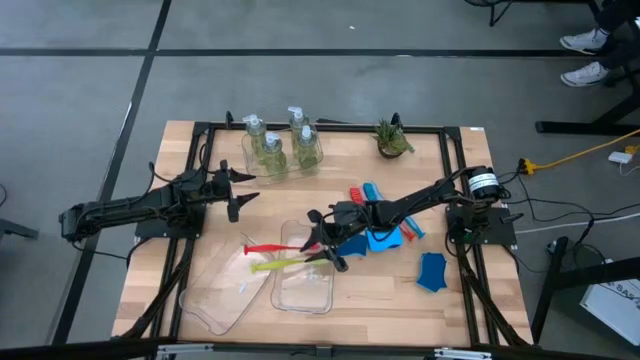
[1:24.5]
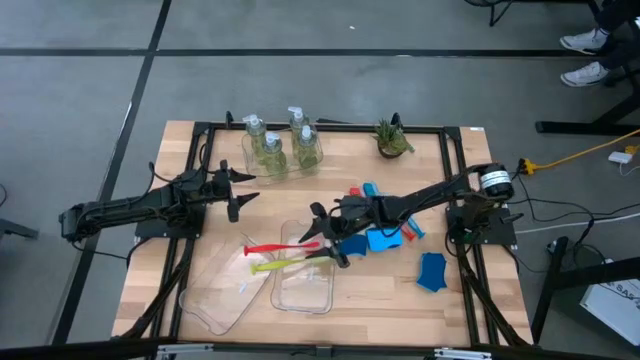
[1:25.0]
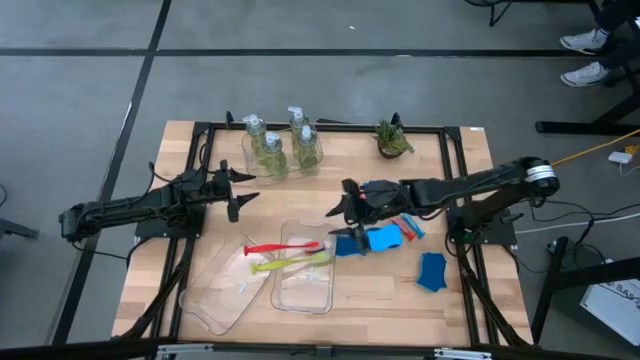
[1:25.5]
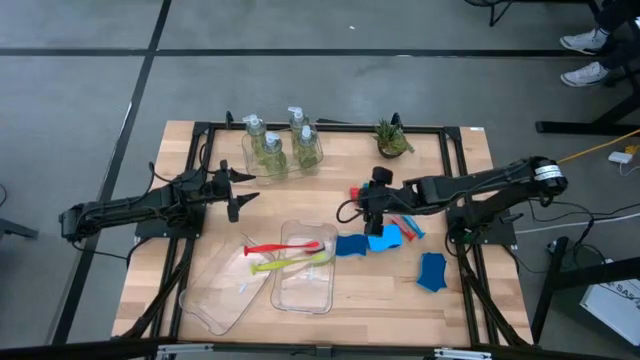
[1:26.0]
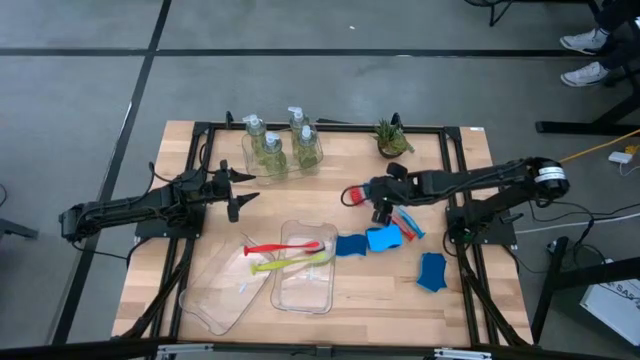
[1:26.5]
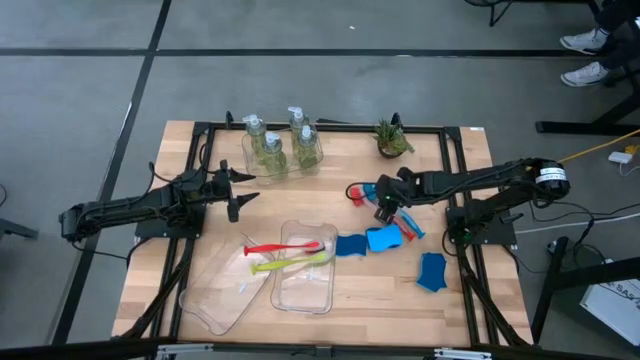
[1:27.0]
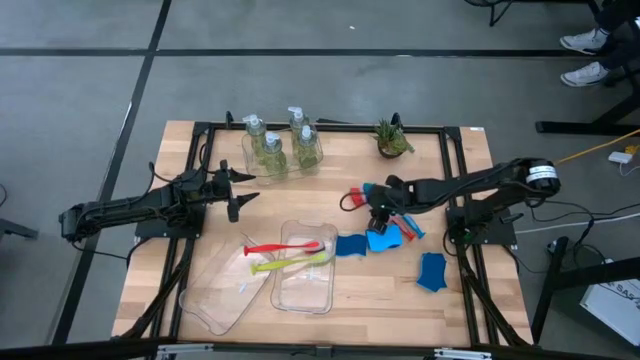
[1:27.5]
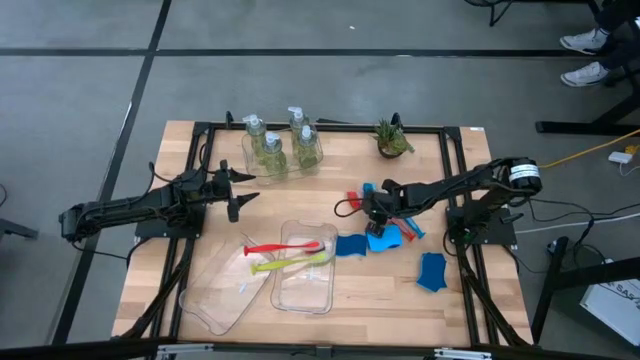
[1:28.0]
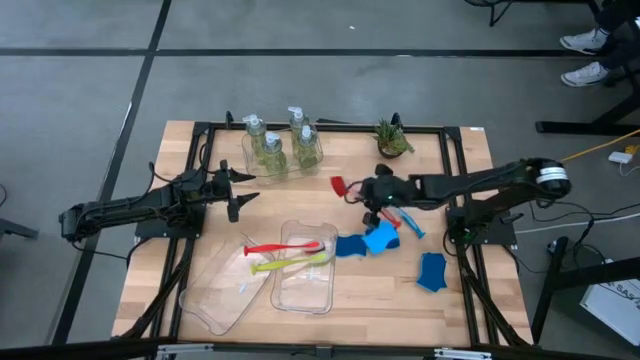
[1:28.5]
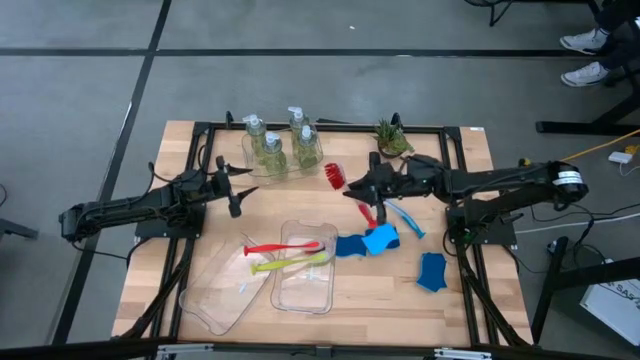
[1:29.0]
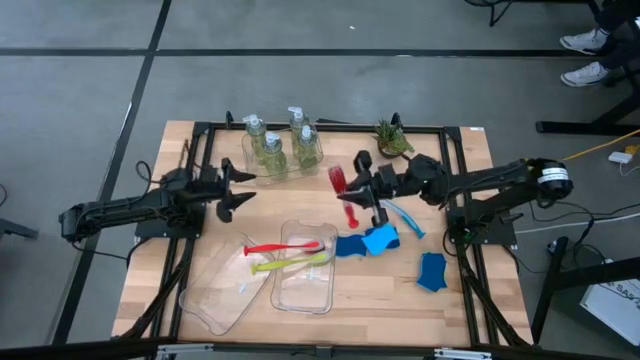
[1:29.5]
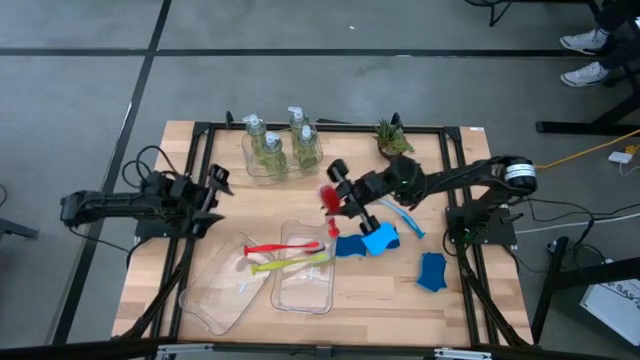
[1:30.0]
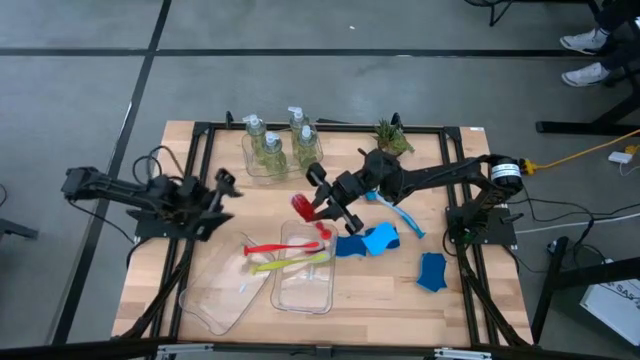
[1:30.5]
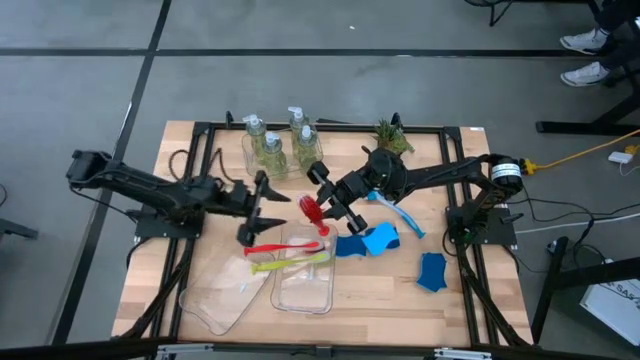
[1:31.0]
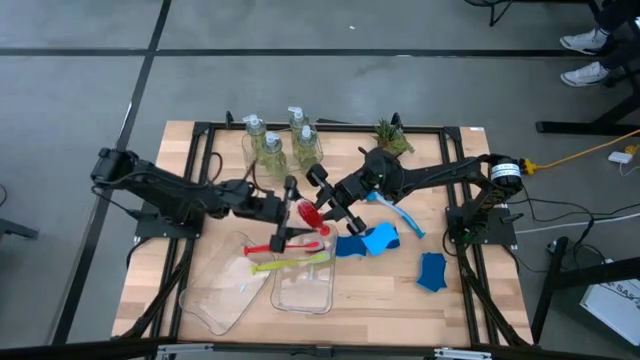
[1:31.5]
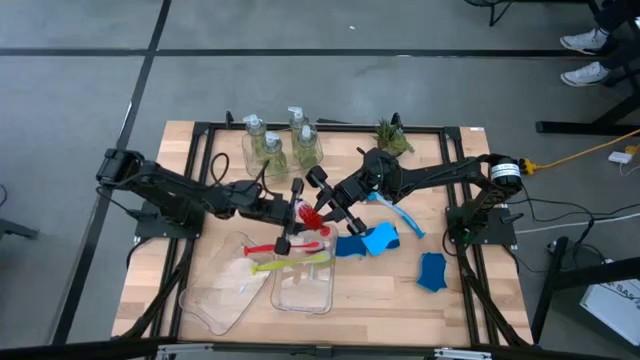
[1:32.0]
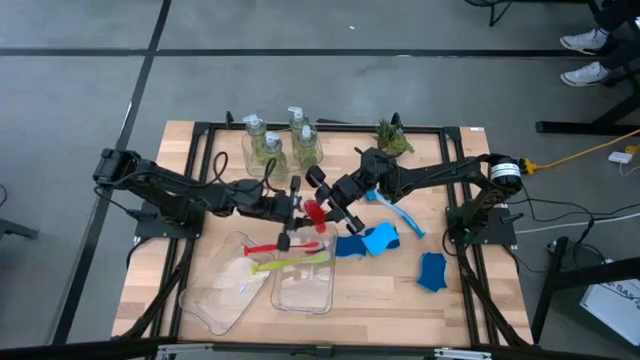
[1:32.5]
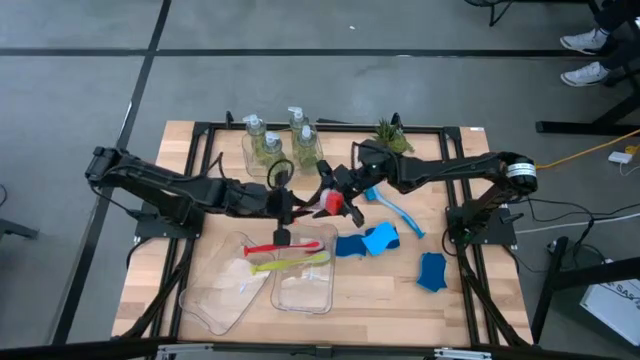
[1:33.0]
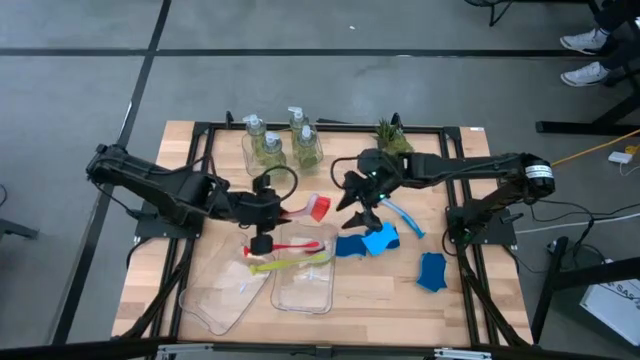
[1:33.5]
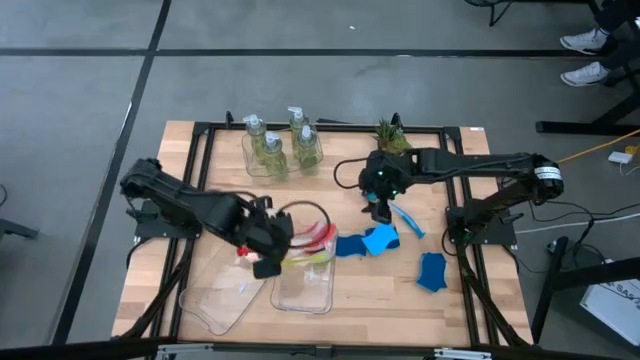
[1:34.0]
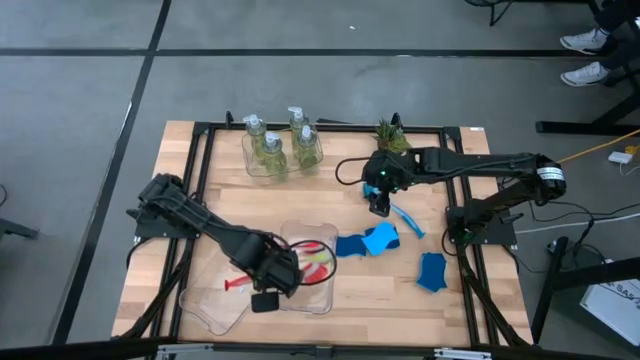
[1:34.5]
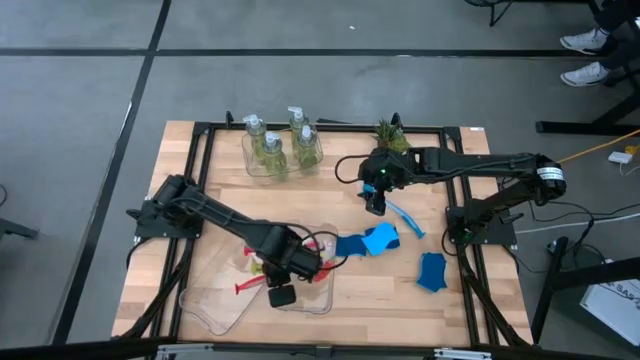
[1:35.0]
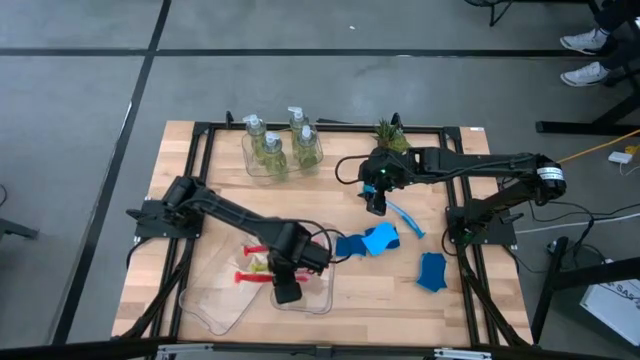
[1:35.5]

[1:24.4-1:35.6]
Task: Pick & Place Kitchen Sink Supplies
Put the orange dish brush into the right transparent bin

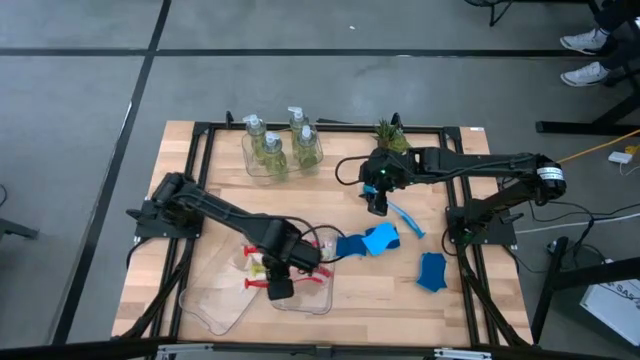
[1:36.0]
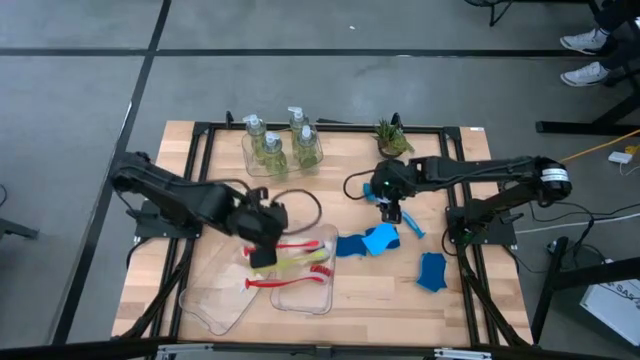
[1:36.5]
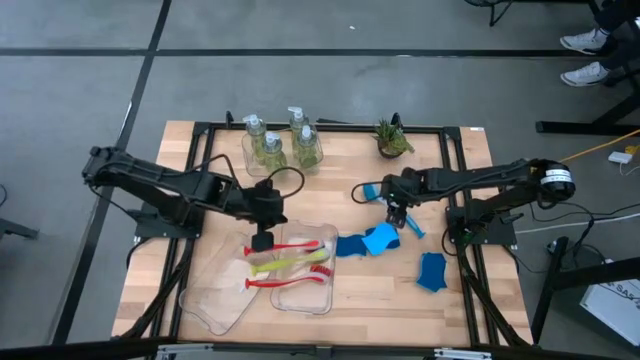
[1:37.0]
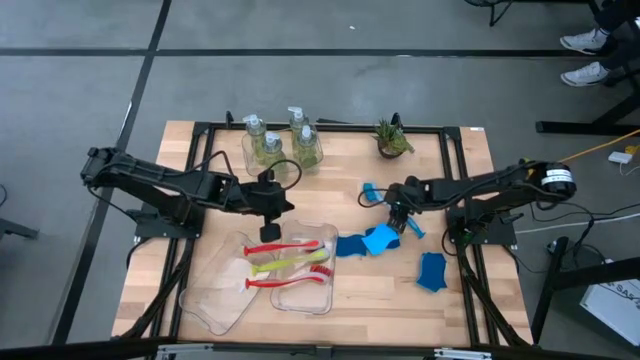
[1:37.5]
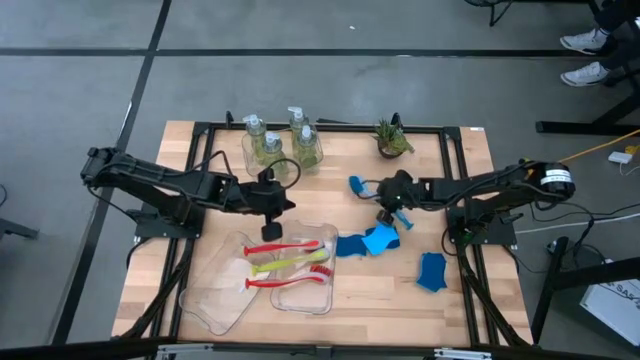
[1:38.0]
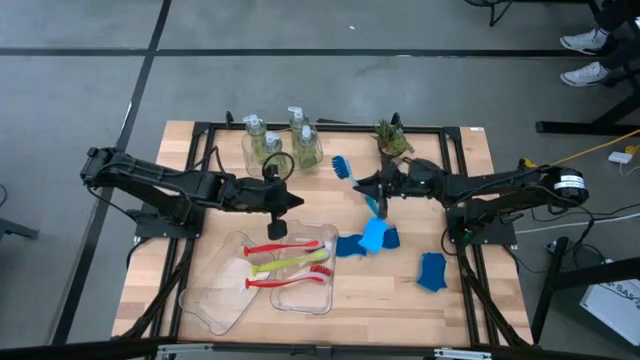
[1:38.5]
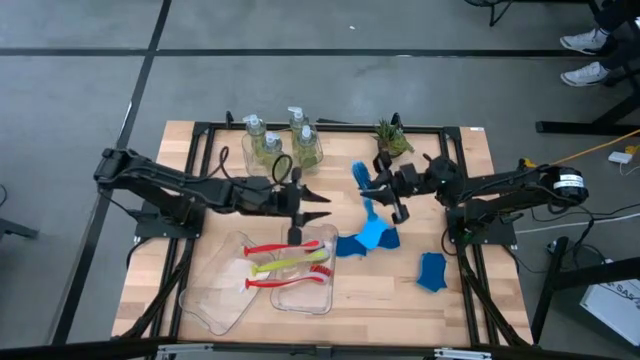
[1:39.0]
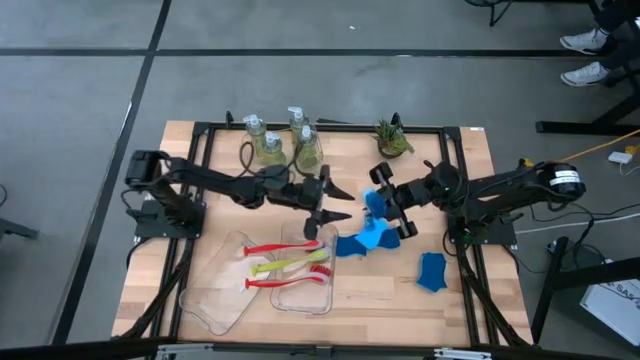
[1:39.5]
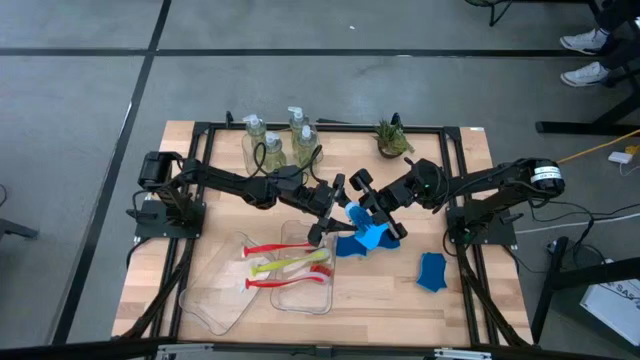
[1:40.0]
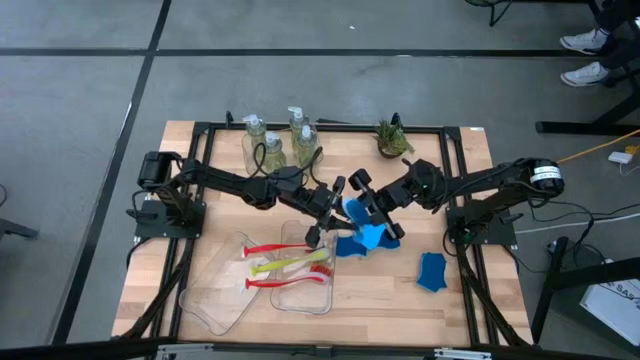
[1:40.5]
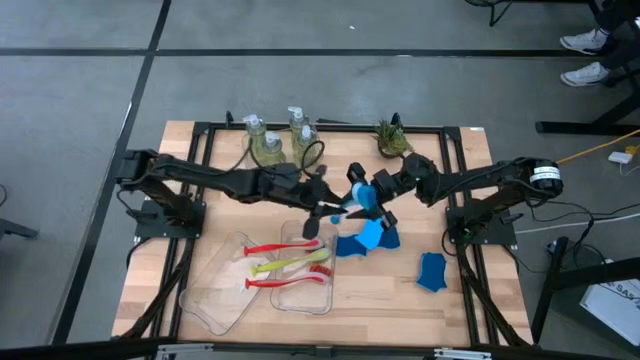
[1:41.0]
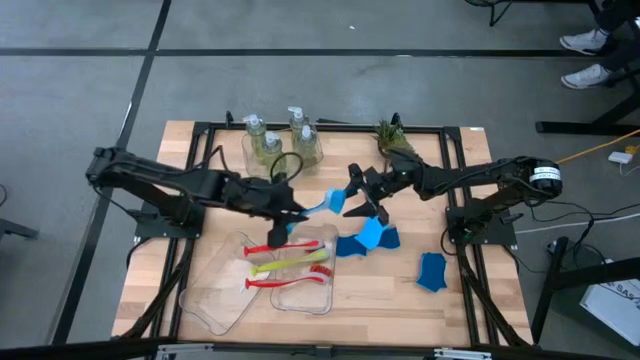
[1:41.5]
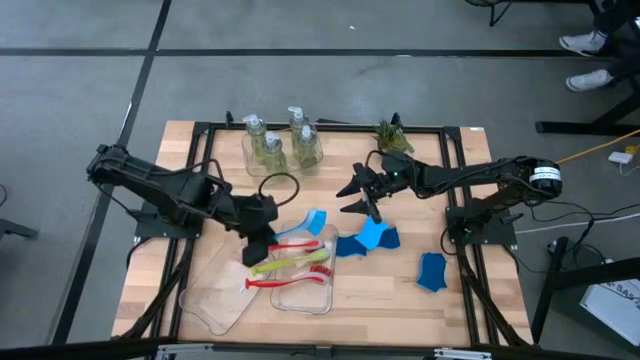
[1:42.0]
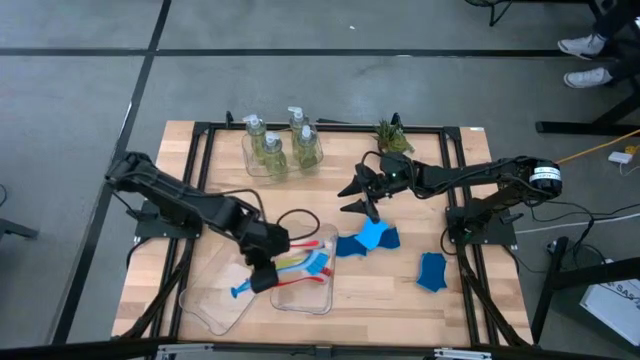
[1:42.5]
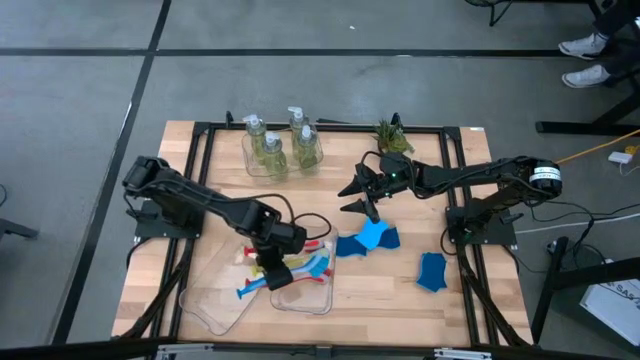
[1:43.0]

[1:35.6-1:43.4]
Put the blue dish brush into the right transparent bin

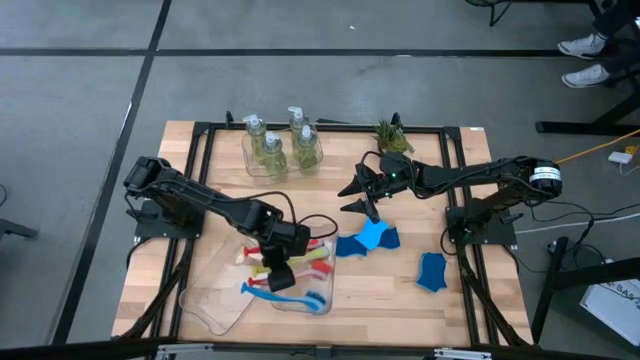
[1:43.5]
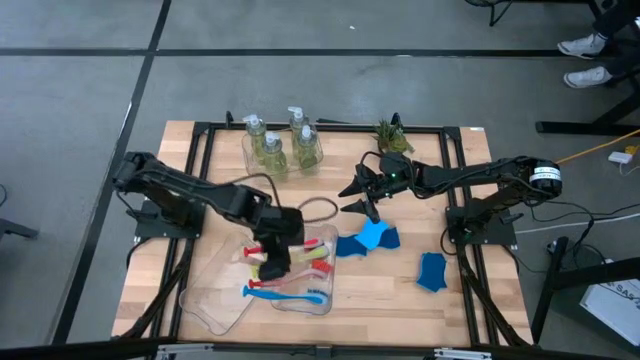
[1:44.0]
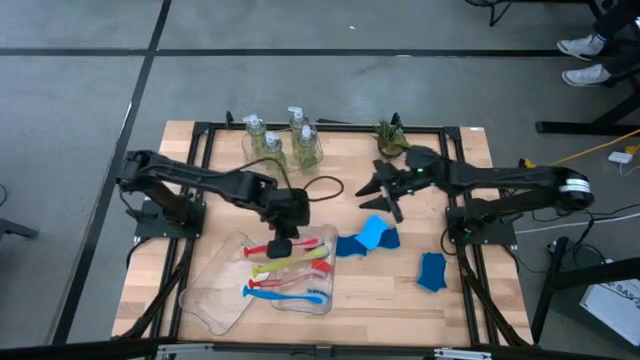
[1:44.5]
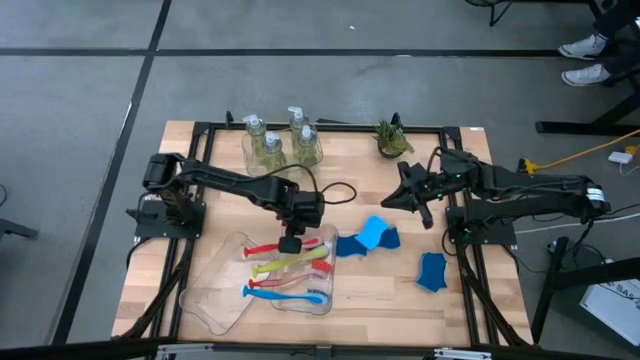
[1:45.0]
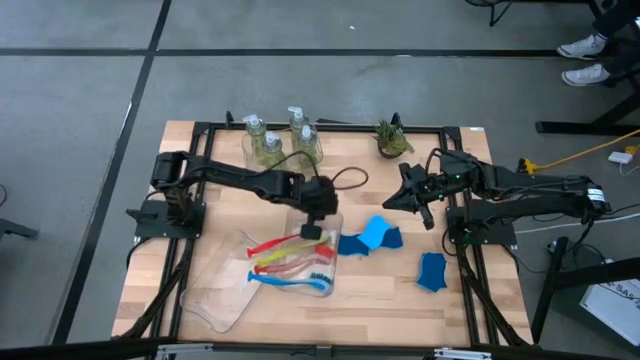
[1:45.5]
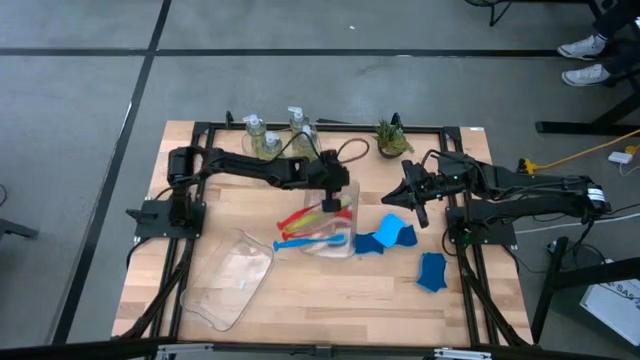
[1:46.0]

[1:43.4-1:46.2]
Move the right transparent bin to the center of the table
